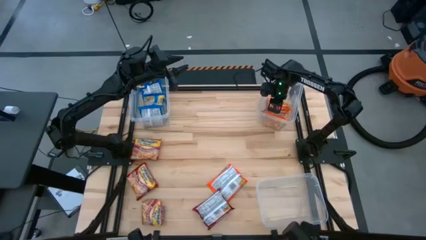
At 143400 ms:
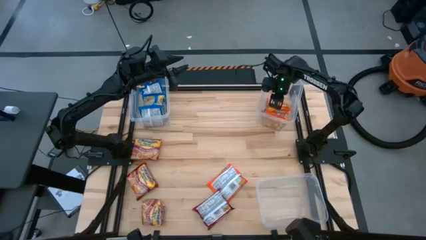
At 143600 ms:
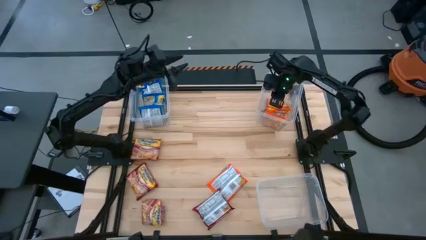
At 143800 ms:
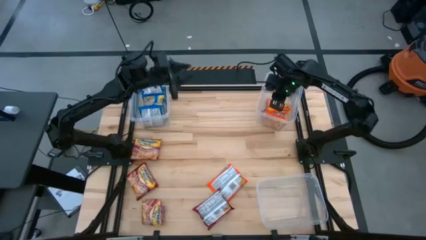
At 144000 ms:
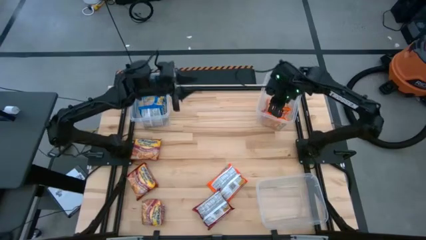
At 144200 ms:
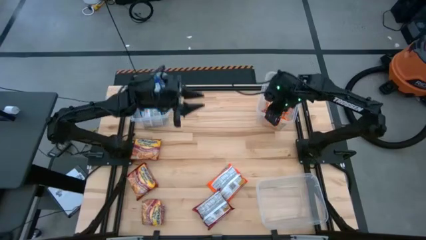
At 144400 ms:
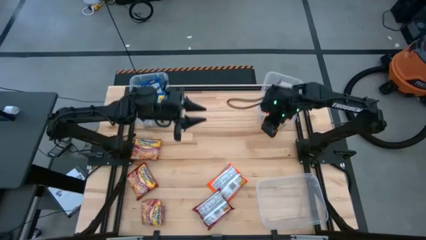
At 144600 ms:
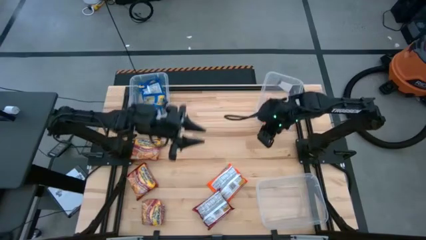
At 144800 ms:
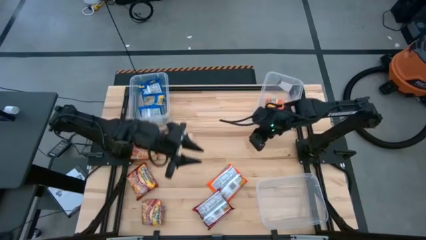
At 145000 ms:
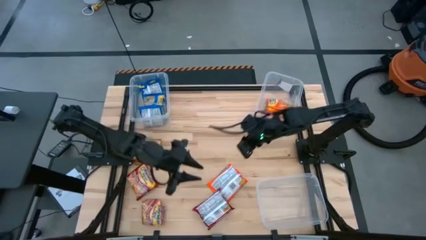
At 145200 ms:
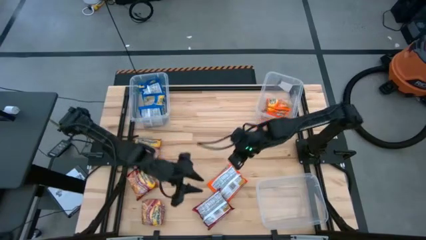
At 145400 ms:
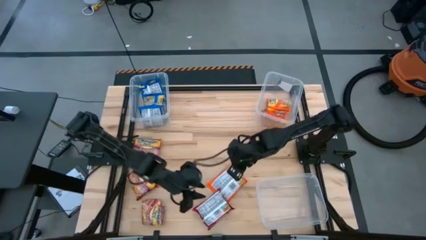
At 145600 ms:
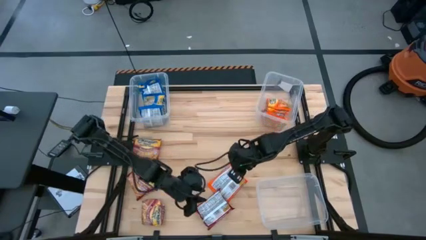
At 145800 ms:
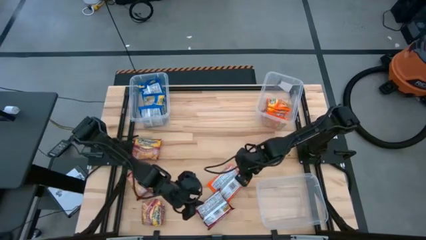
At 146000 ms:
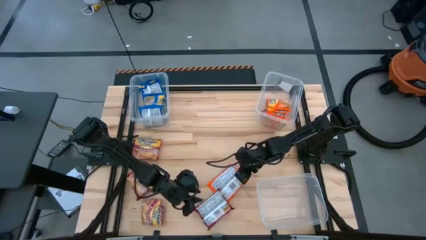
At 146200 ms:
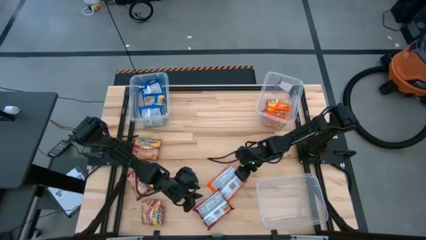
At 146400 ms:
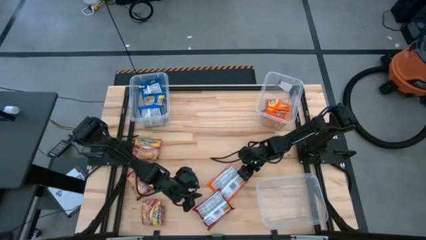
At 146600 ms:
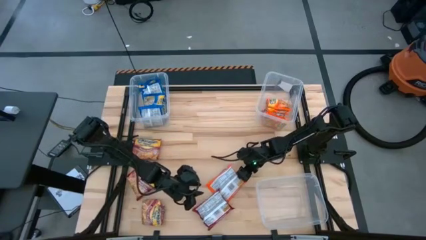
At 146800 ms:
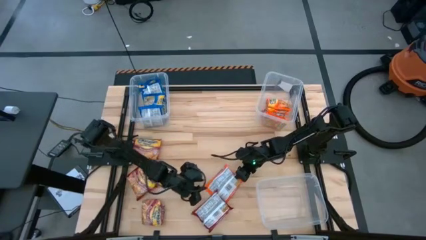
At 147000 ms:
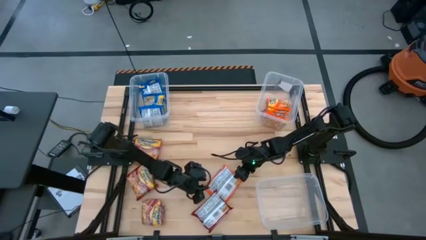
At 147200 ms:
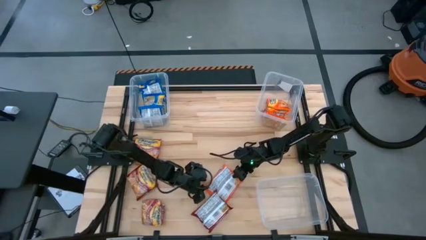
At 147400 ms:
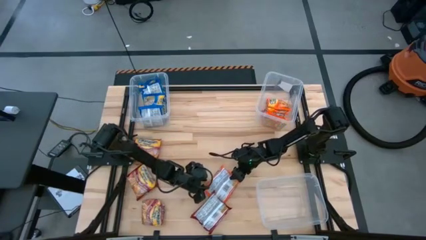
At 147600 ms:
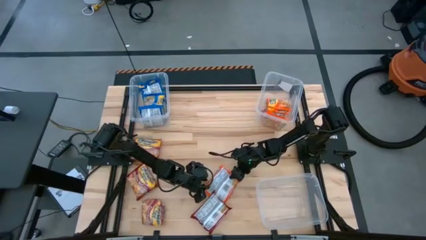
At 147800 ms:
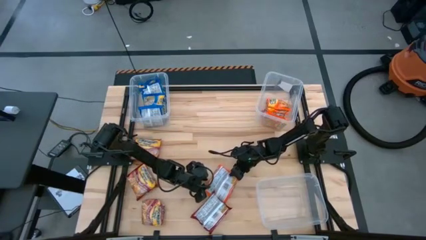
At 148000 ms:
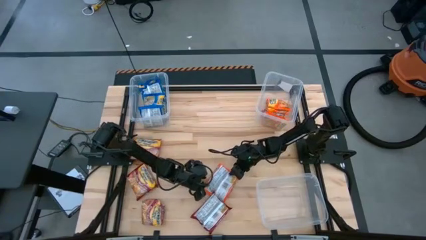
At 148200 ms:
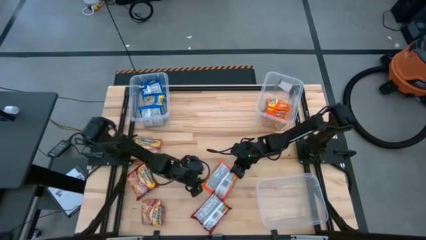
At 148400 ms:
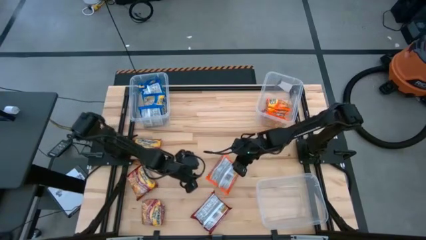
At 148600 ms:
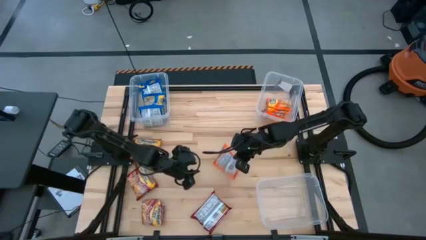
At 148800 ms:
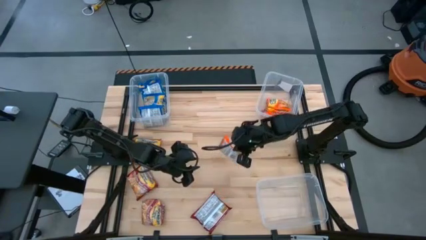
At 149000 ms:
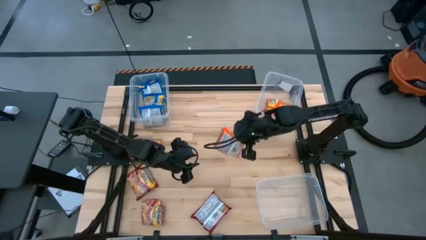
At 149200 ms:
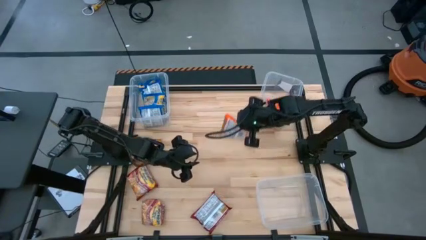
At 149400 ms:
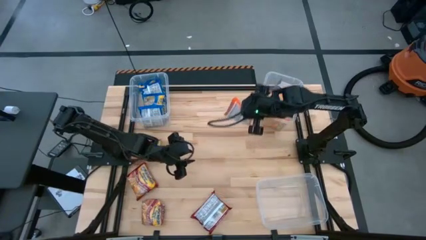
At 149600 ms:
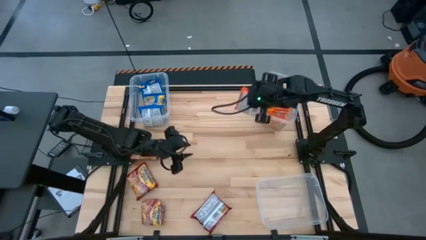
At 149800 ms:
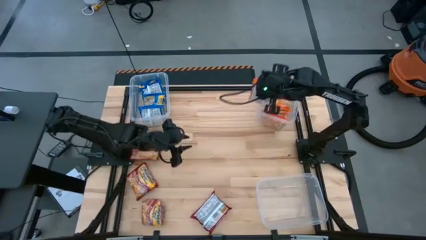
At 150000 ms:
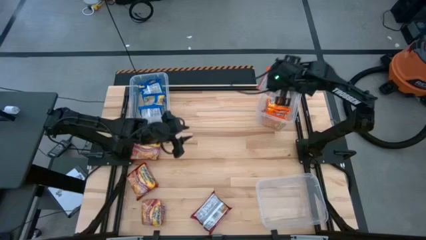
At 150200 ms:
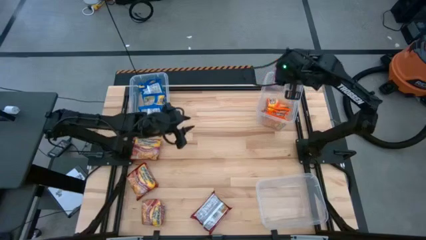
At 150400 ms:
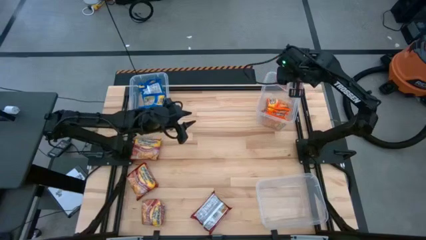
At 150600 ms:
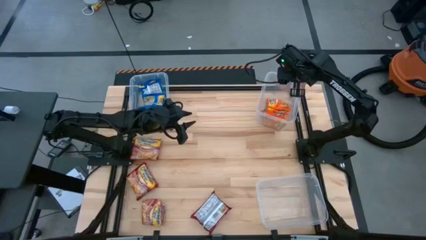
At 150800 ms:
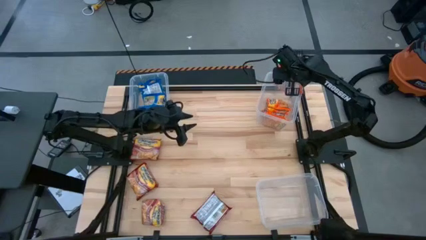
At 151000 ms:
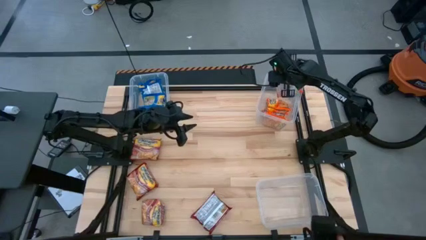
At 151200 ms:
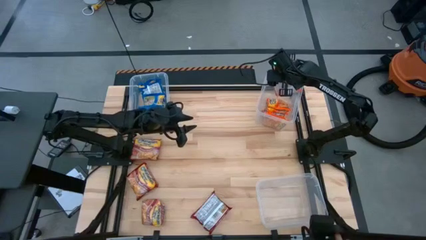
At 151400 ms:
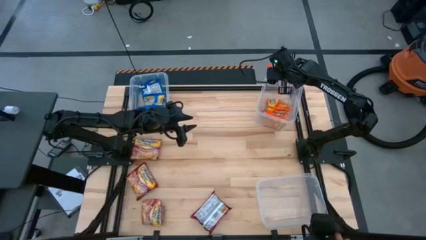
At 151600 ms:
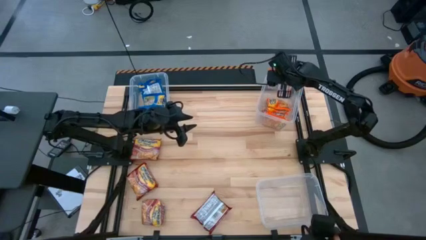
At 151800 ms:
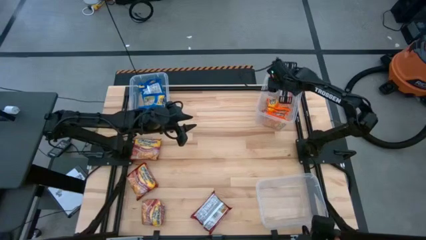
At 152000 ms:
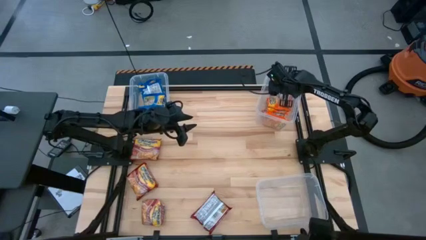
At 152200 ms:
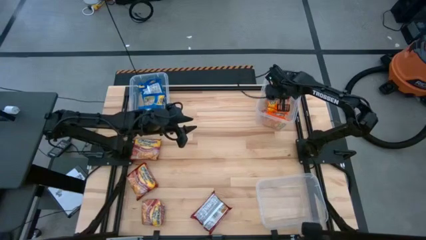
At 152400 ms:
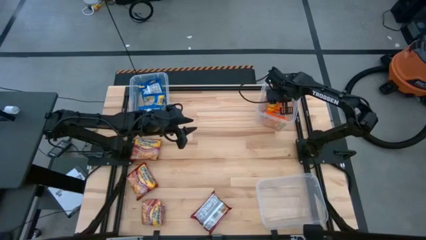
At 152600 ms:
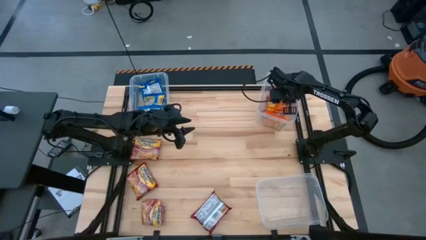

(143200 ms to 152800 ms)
Task: Sort Maruchan noodles
Put the orange noodle pack into the top right transparent bin

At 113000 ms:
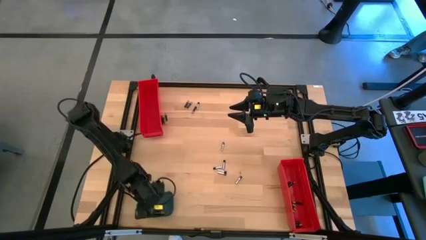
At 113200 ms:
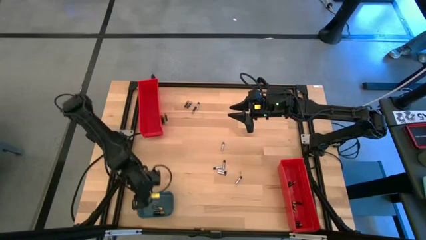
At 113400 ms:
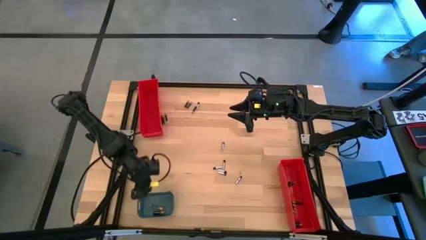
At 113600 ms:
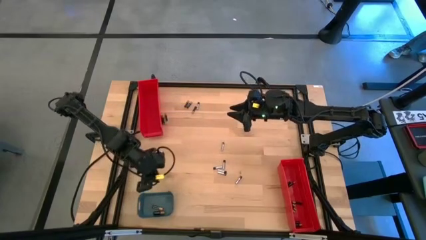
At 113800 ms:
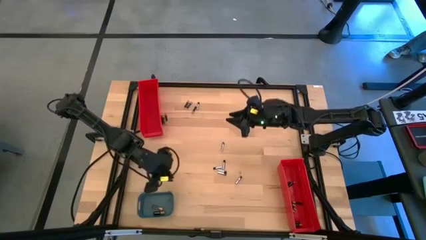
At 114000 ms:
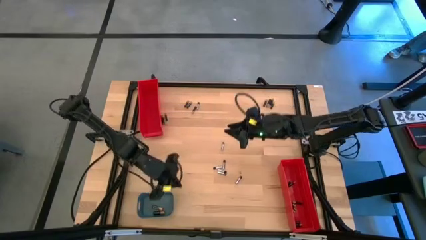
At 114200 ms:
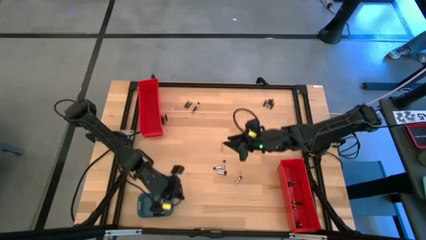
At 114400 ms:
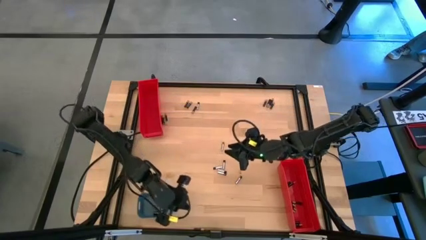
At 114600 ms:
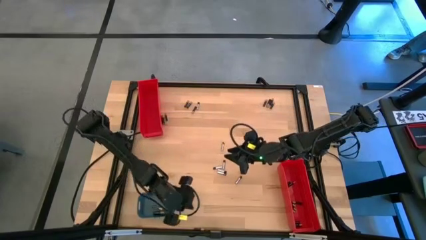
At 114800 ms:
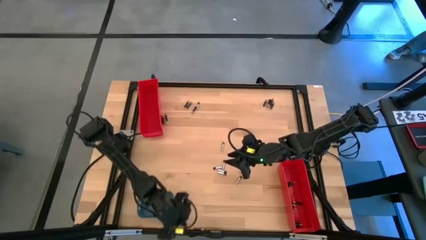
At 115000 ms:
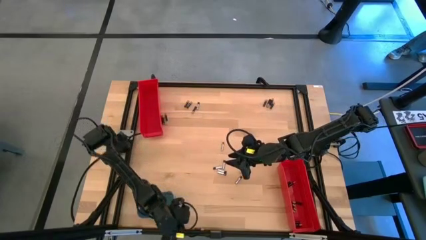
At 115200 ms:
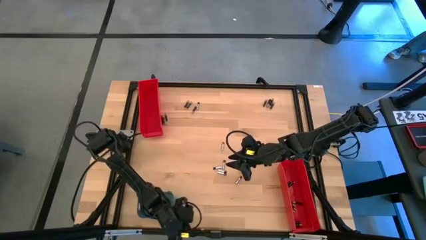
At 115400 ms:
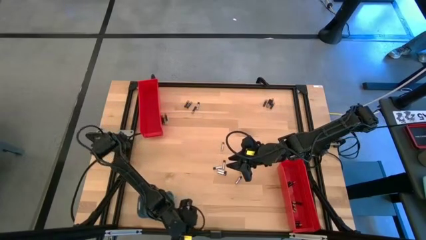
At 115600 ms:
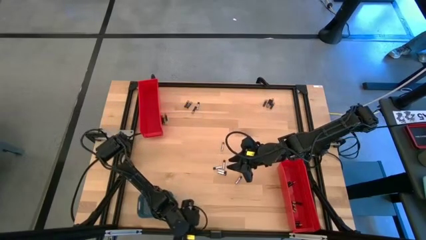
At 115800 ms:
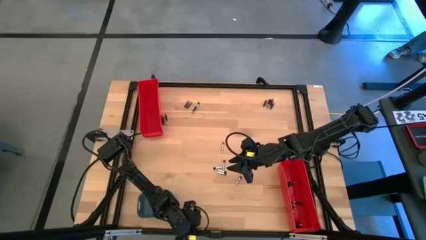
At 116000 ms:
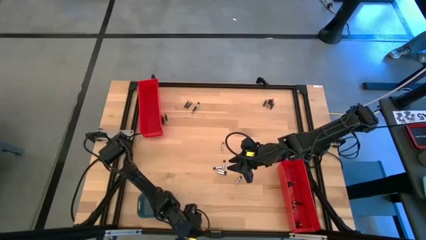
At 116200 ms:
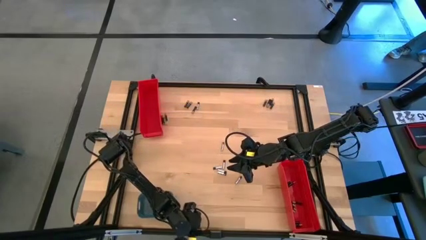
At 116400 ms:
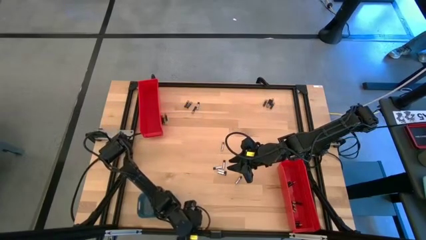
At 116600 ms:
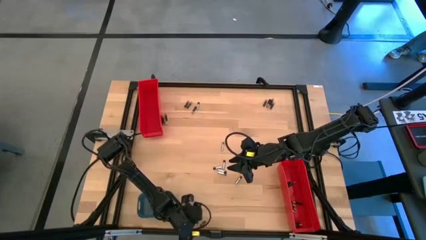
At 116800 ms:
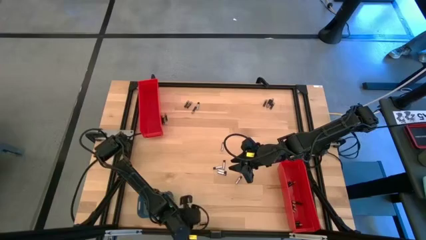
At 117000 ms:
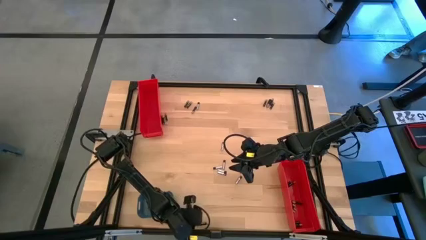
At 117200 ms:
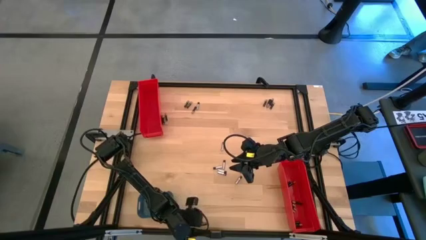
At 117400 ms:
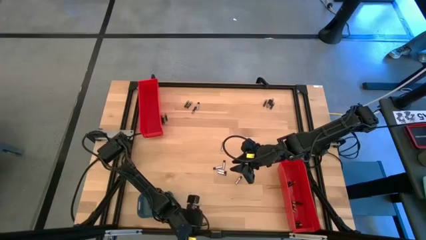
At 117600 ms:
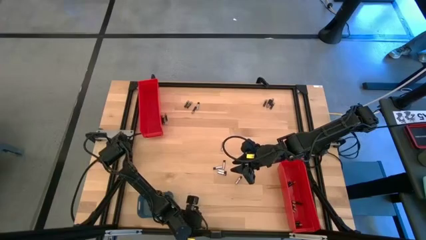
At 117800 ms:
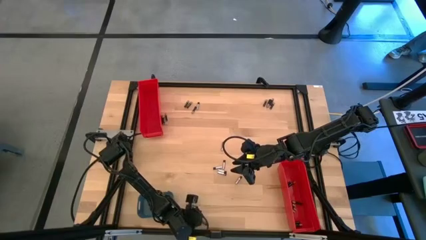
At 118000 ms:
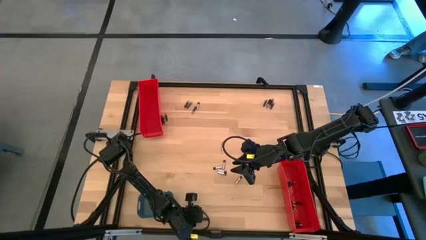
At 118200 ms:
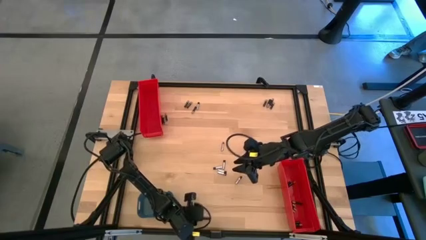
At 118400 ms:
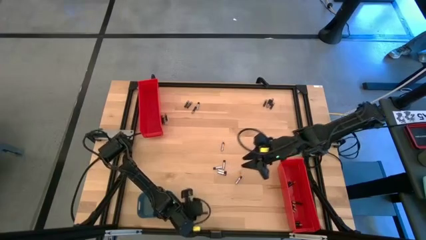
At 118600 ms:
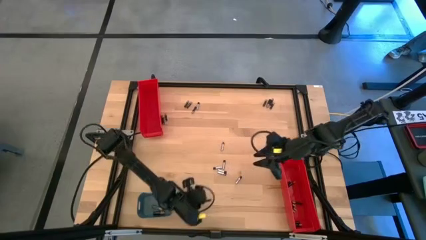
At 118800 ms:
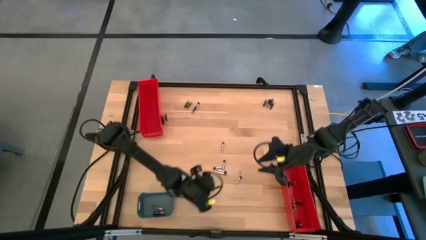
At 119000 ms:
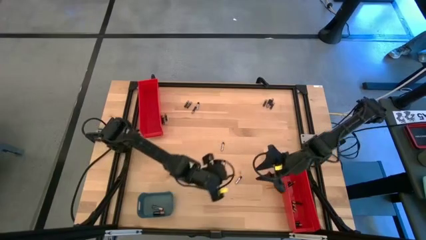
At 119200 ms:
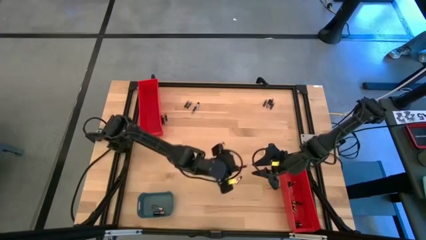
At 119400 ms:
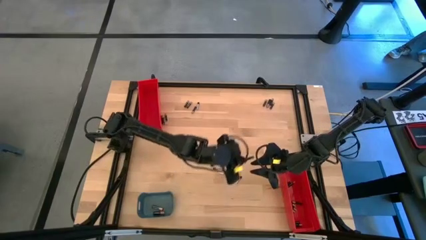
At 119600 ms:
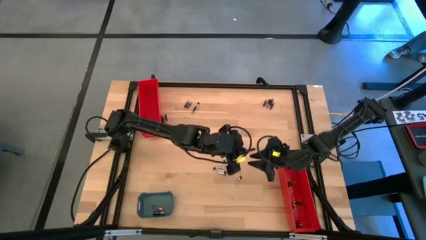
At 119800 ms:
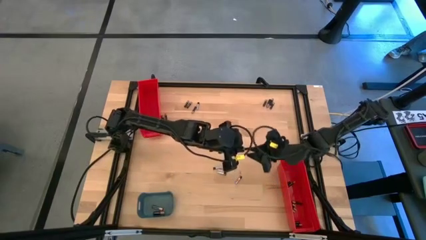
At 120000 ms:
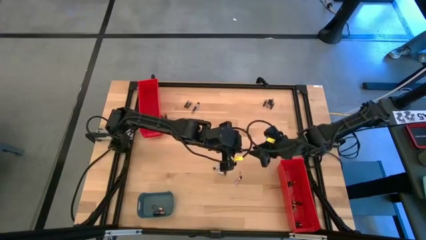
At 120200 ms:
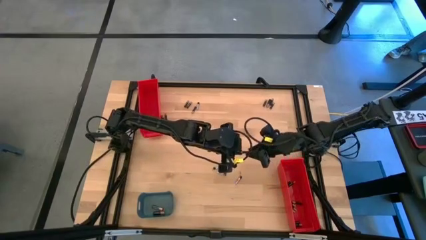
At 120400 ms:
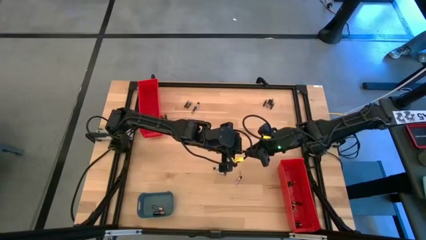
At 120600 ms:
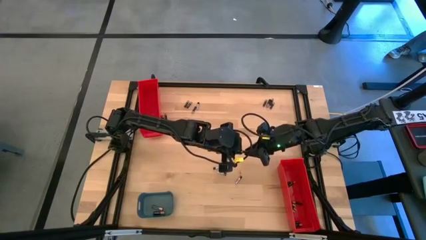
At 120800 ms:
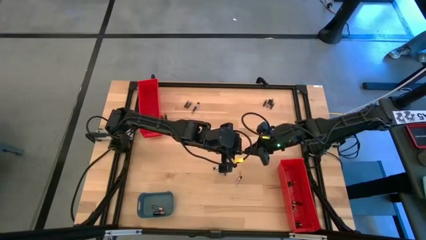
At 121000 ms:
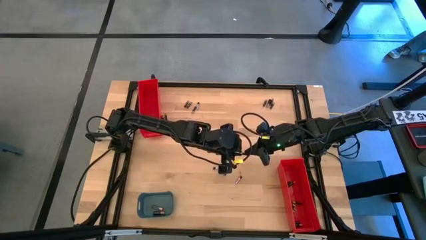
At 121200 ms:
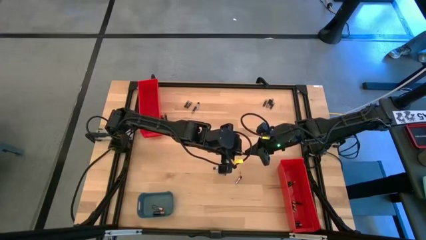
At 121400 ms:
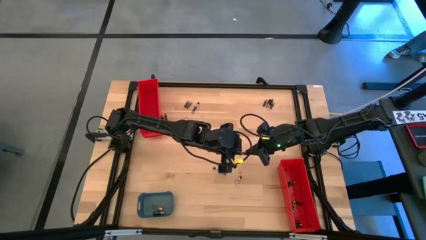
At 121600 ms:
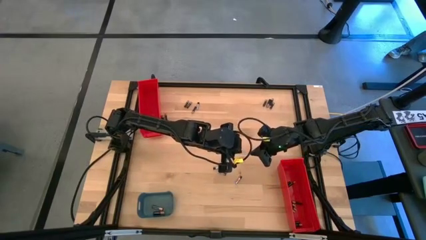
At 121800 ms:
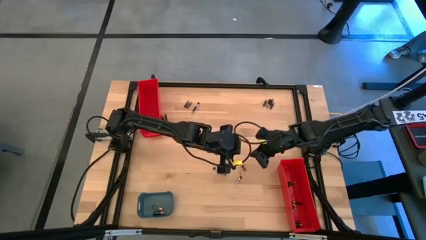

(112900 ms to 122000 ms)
Task: Sort batteries
Put the small black battery into the bottom red bin
